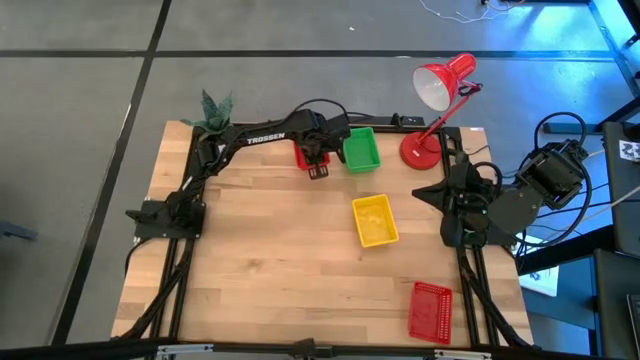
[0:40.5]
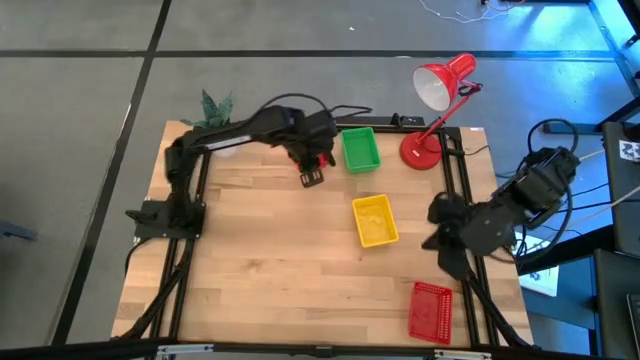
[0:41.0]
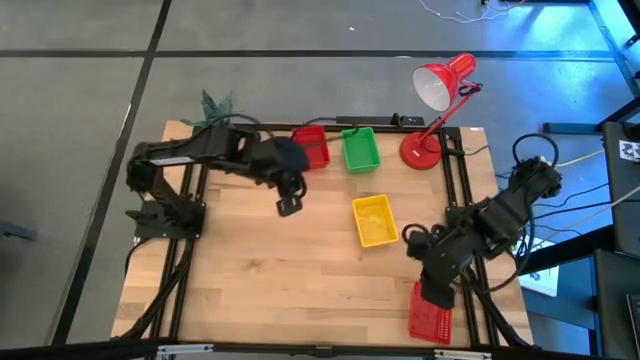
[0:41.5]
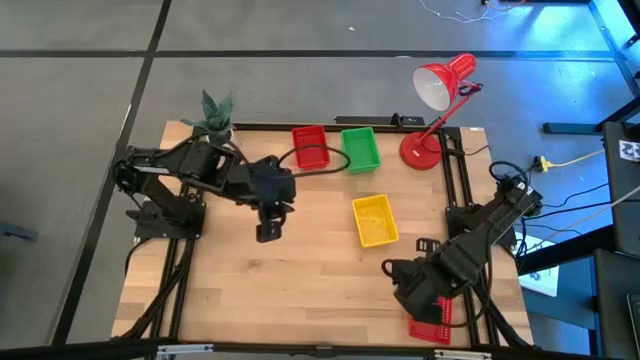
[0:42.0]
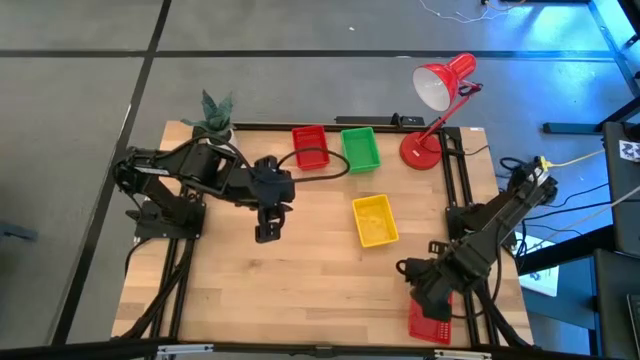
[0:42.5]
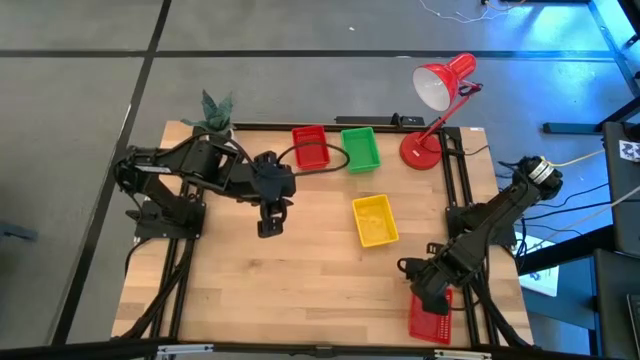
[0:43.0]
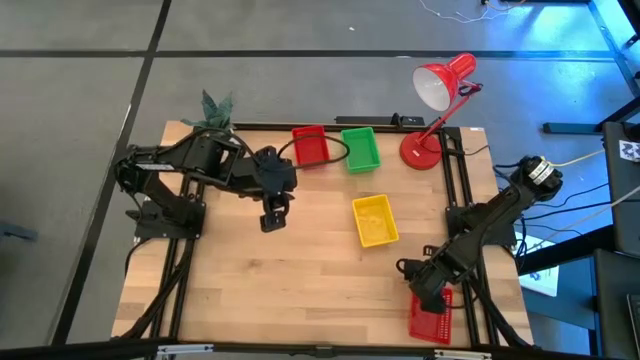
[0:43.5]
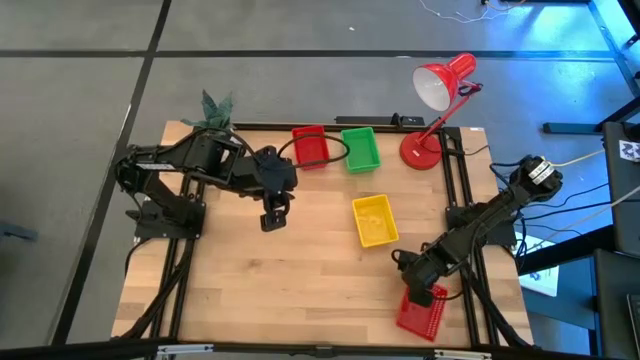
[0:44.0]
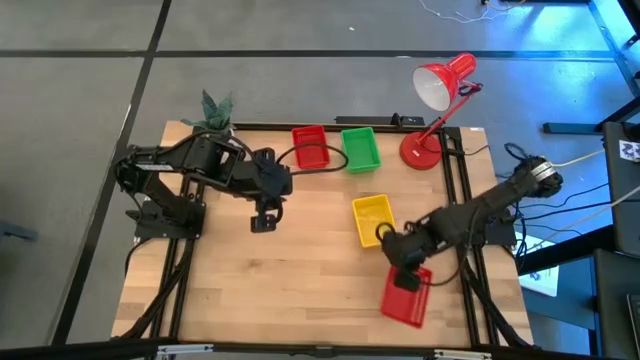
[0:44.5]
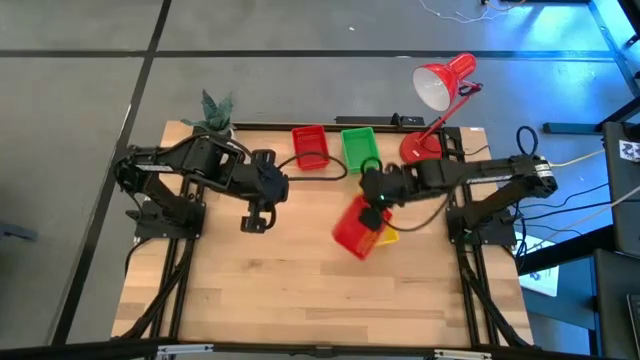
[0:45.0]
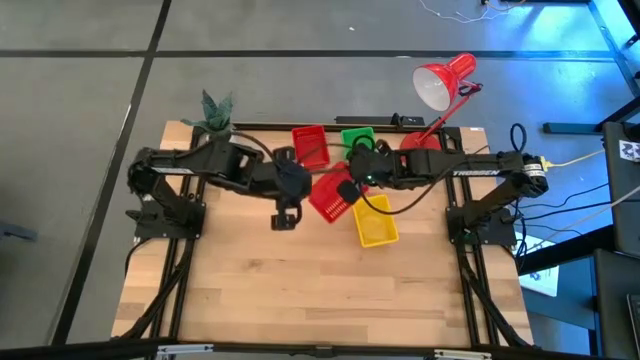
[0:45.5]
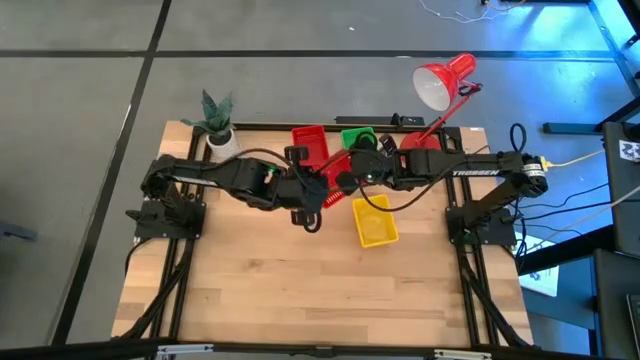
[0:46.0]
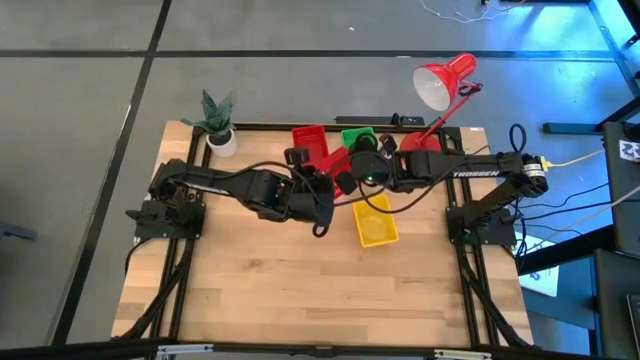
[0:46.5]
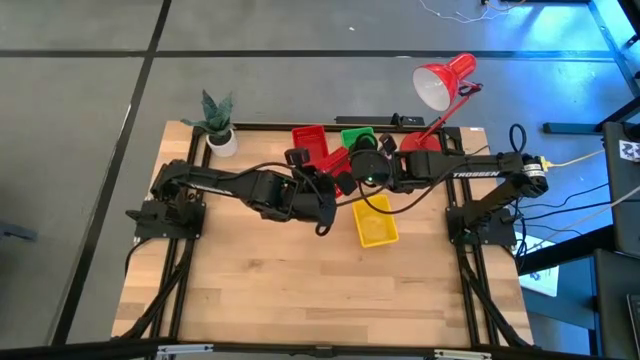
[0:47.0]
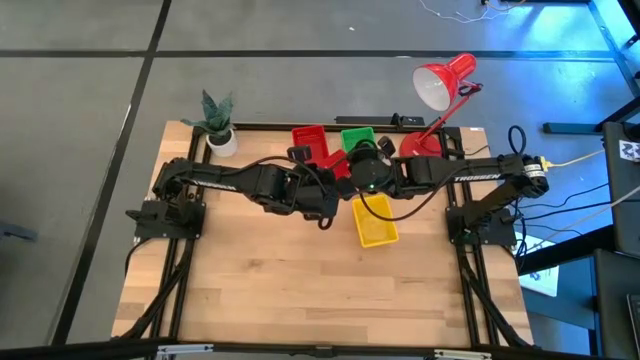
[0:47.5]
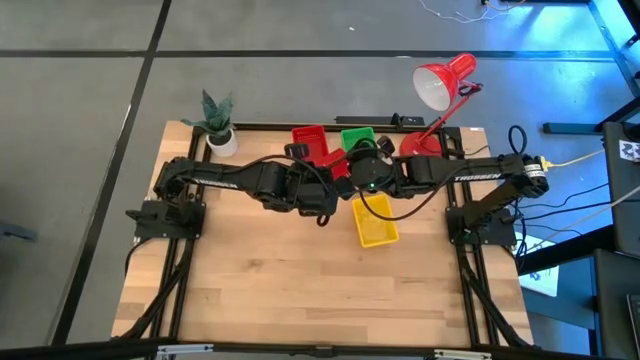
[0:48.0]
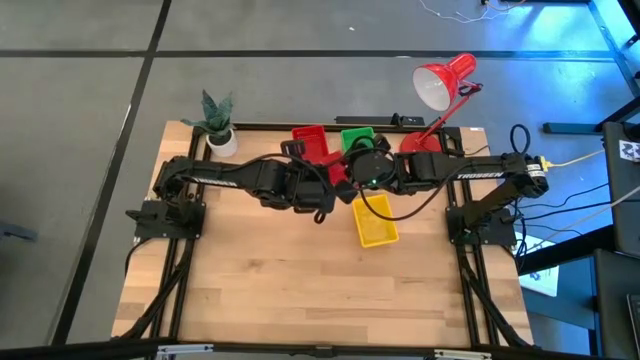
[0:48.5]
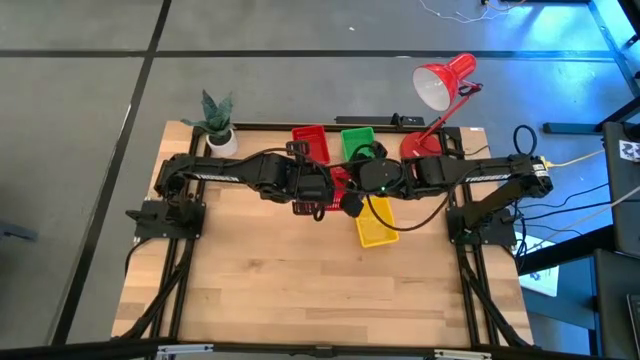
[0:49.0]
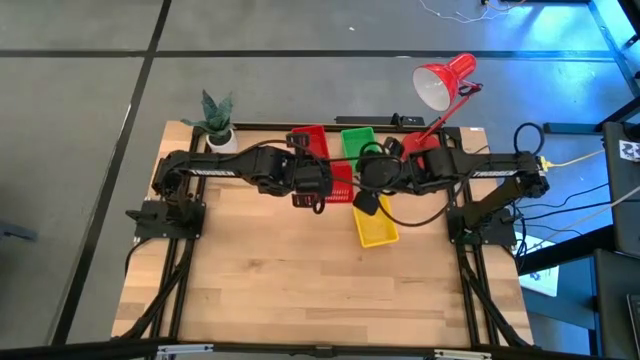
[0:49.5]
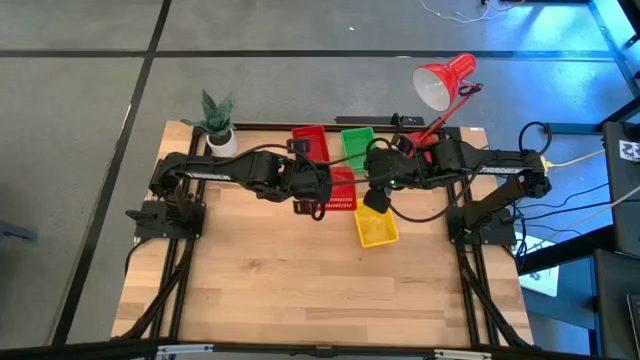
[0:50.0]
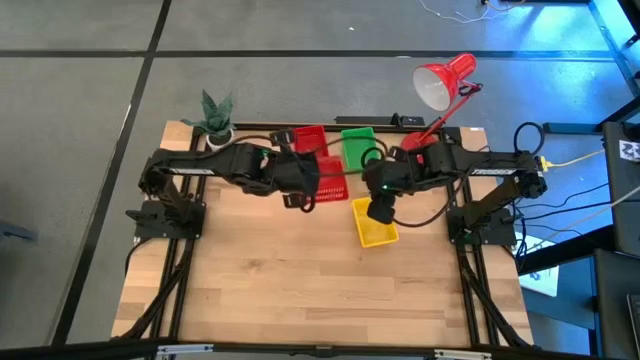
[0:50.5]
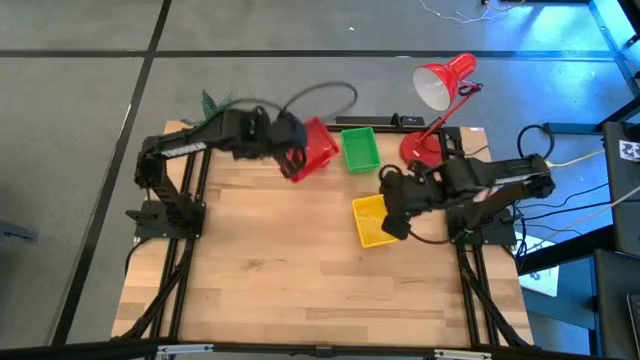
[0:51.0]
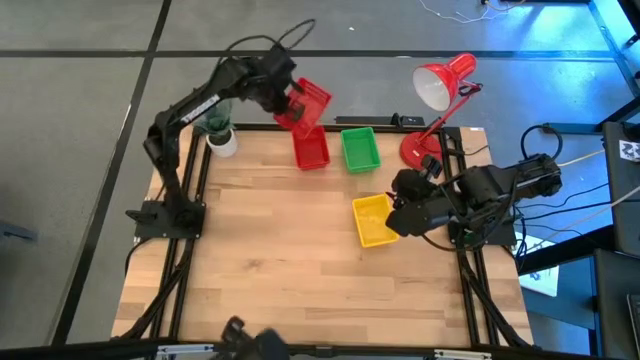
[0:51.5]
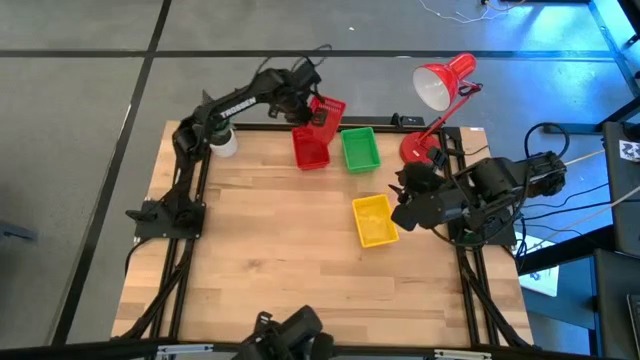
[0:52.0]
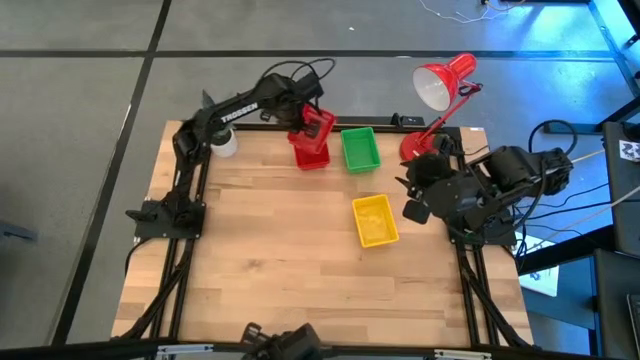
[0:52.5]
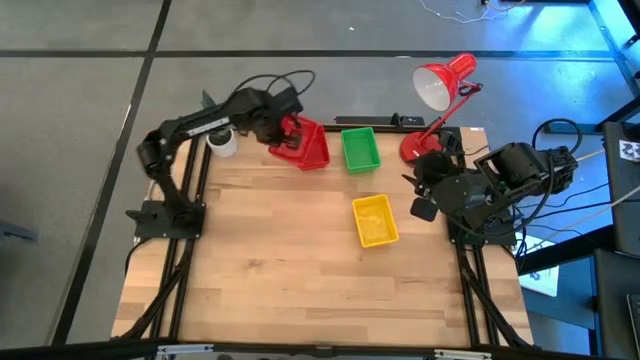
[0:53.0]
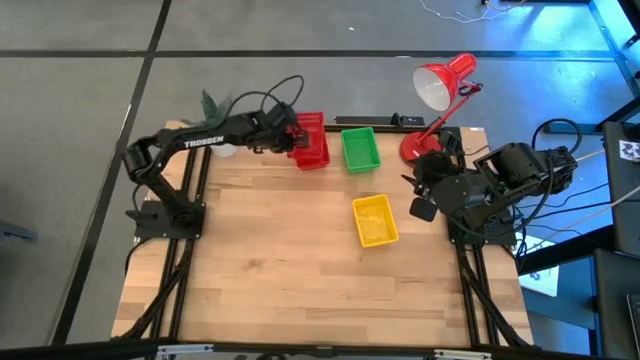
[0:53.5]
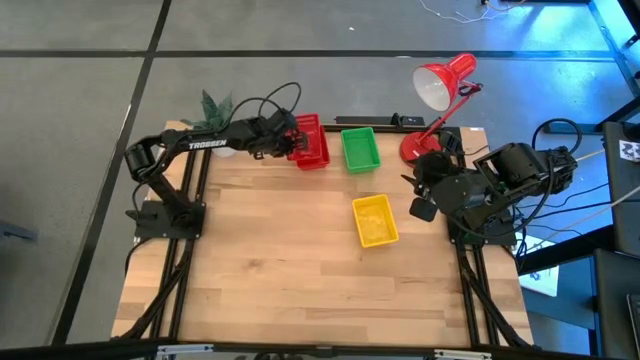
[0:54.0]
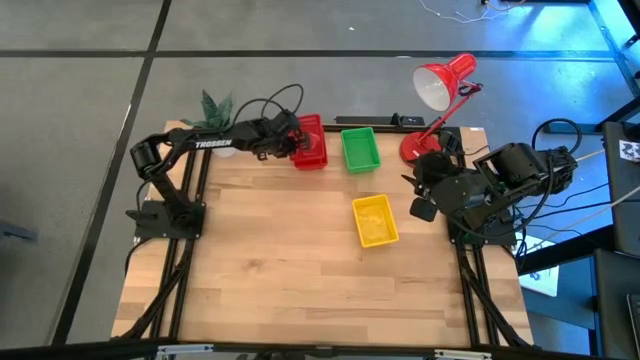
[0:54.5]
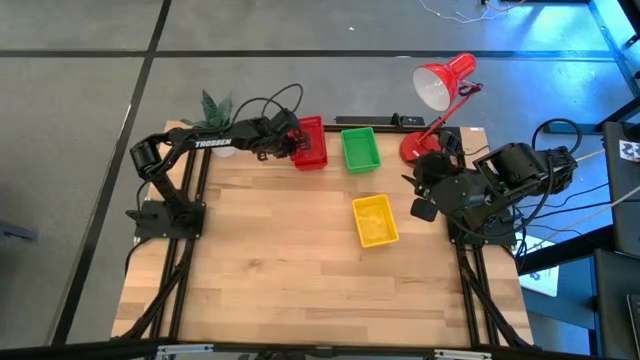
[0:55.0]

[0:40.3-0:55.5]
Stack the bottom red bin on the top red bin

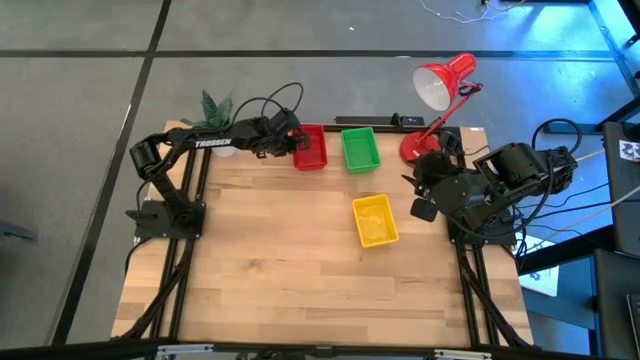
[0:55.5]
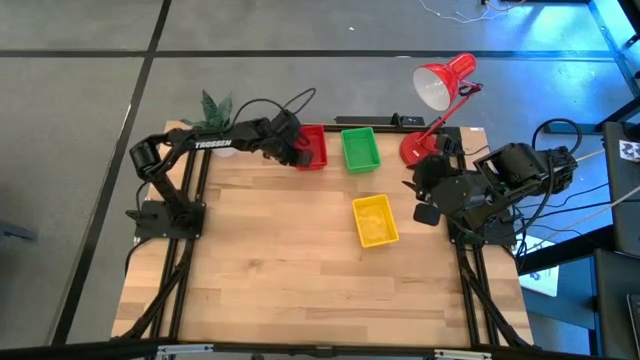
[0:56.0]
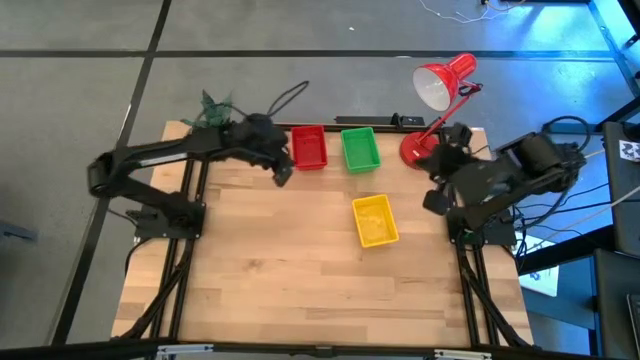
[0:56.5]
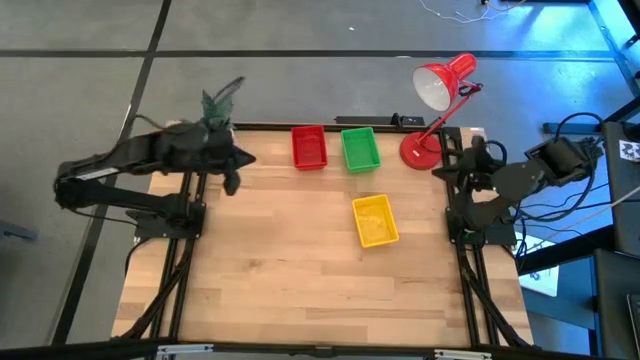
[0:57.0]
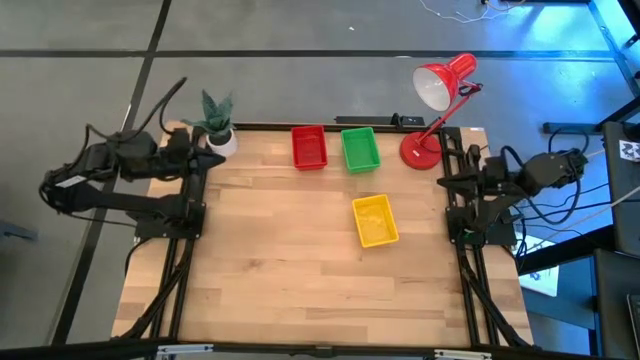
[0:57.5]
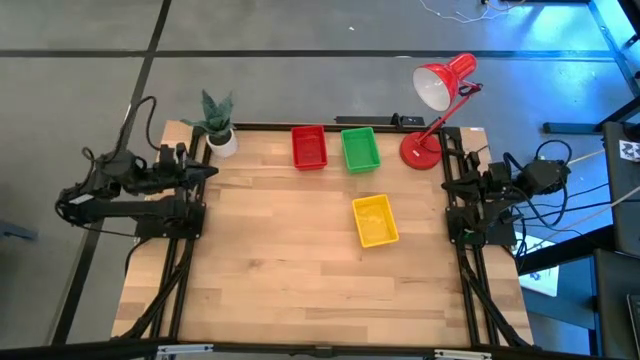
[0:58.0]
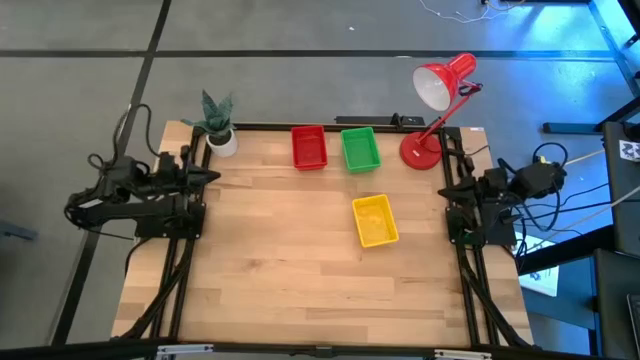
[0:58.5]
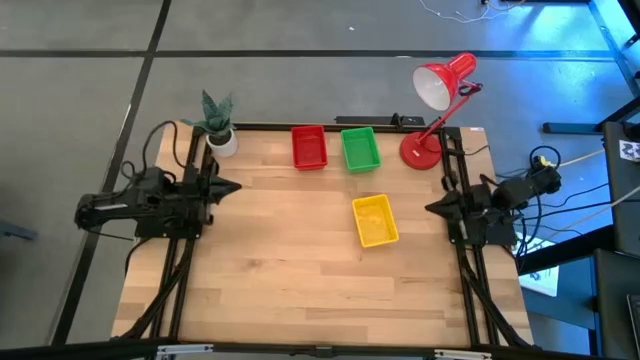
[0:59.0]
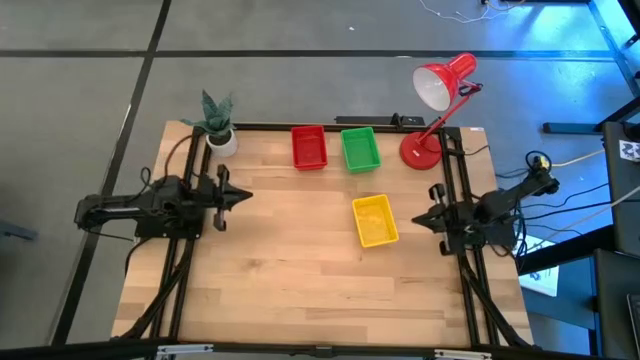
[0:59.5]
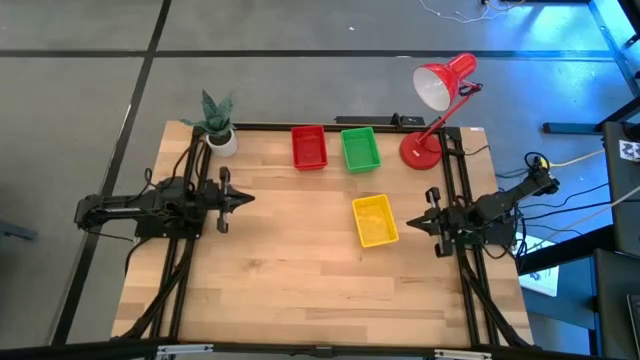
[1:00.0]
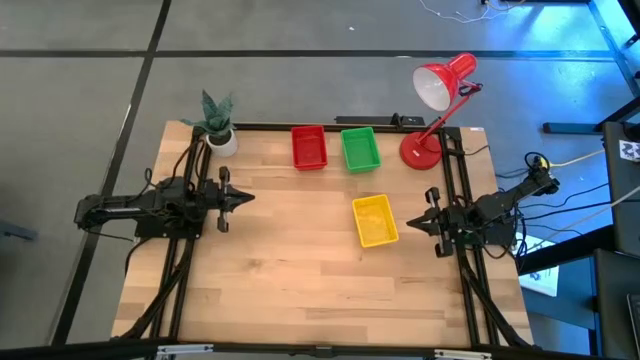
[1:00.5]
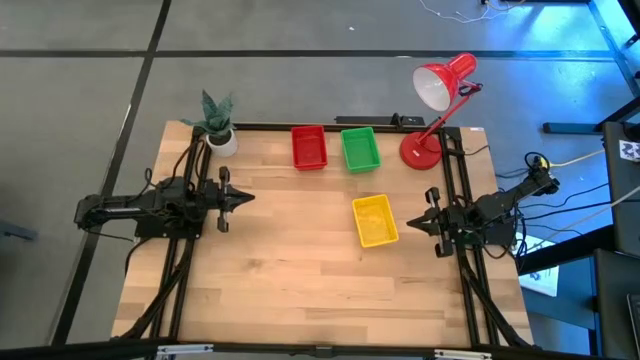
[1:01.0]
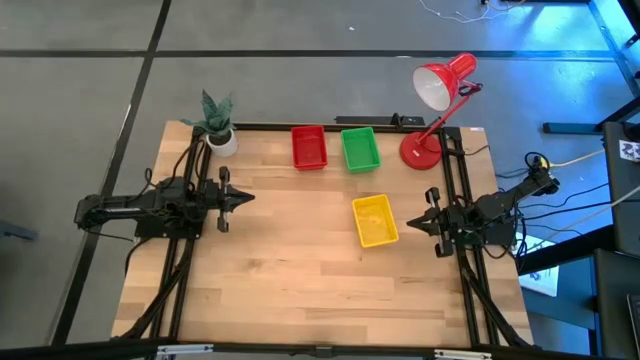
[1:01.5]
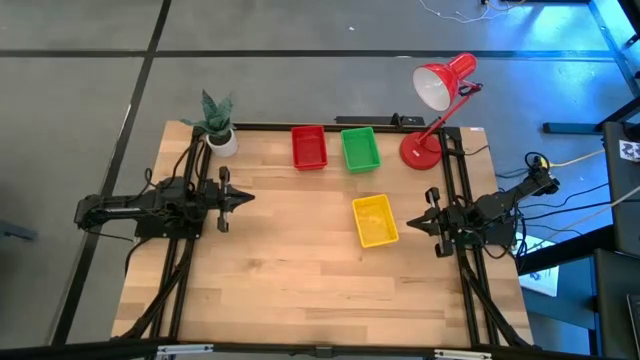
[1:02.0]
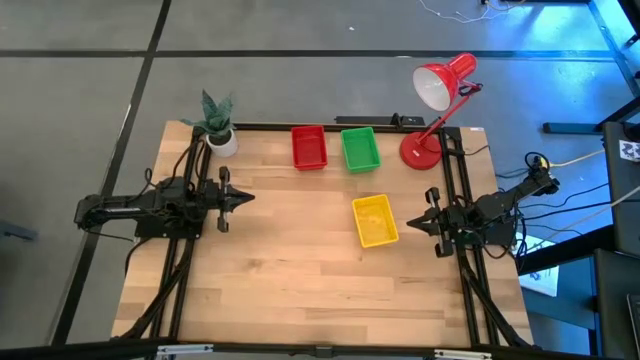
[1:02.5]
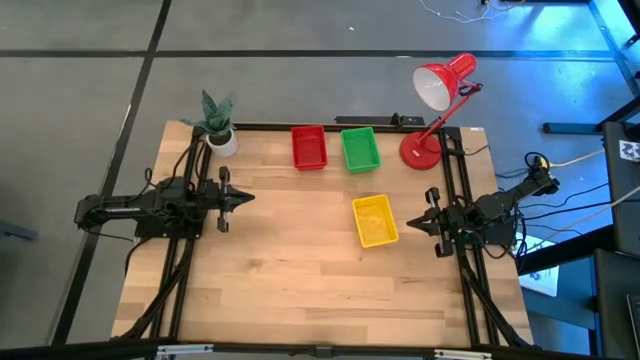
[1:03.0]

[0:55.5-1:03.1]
Return to Home Position
